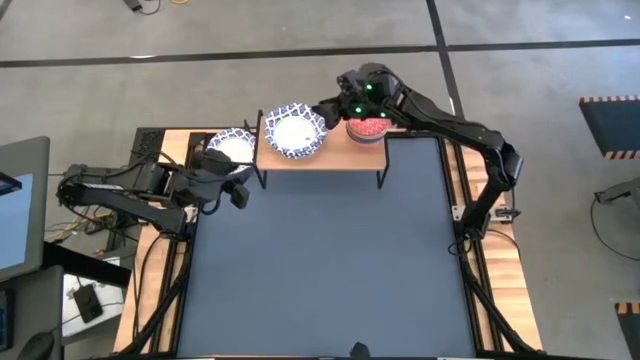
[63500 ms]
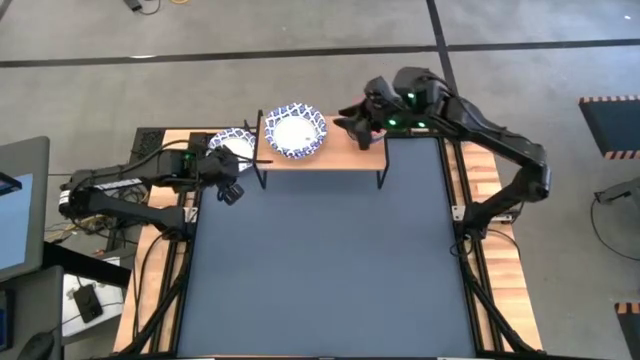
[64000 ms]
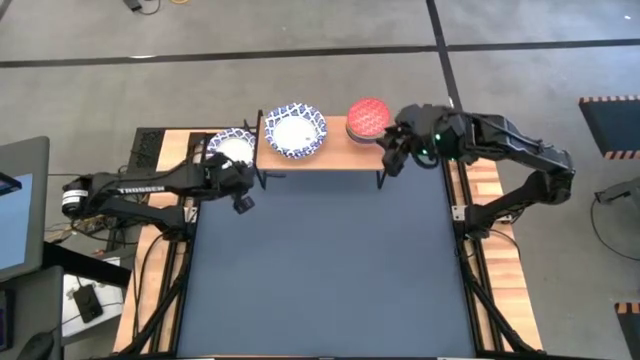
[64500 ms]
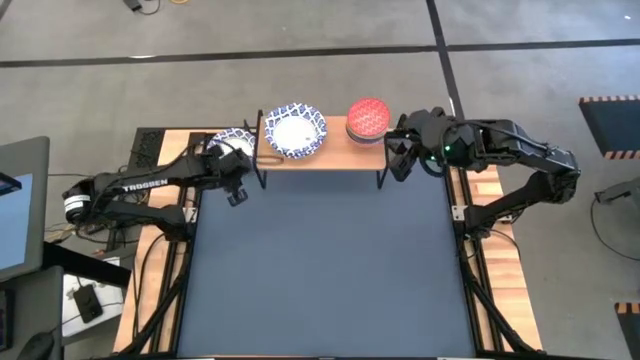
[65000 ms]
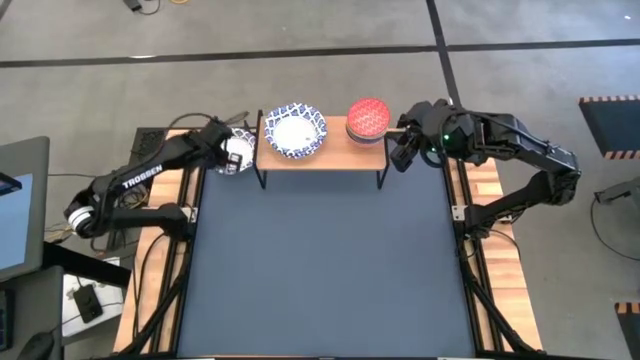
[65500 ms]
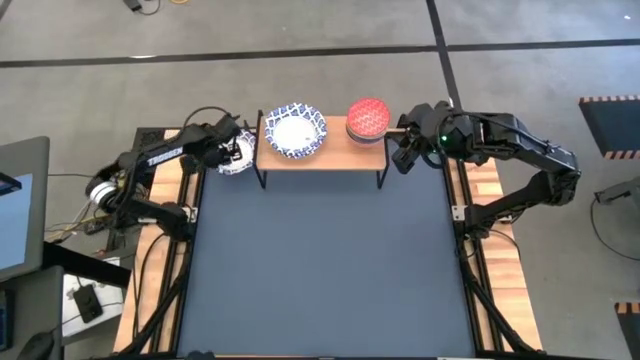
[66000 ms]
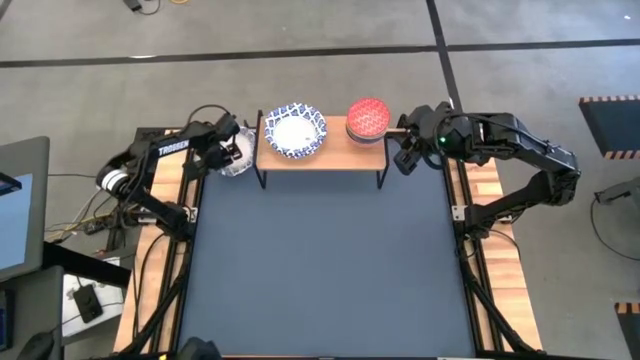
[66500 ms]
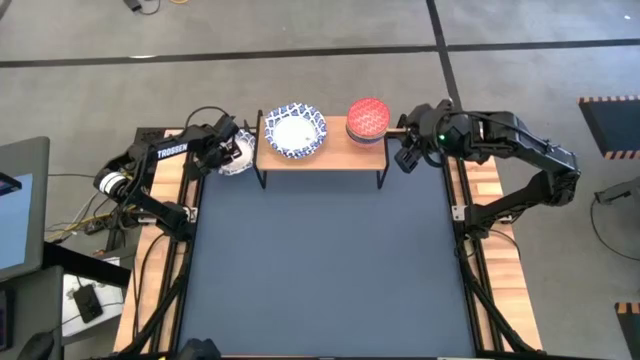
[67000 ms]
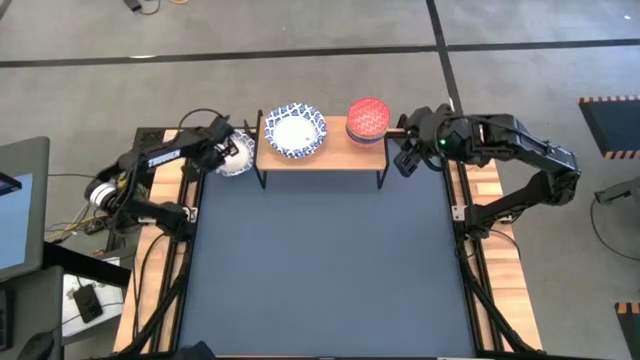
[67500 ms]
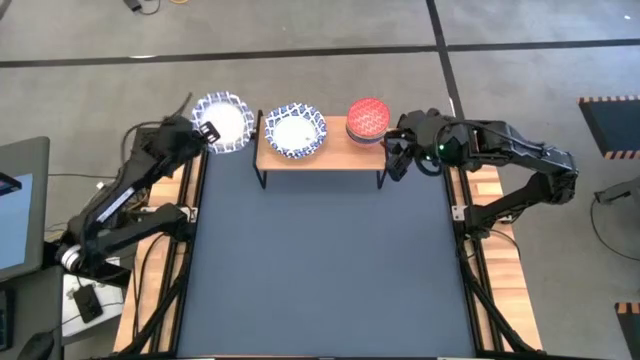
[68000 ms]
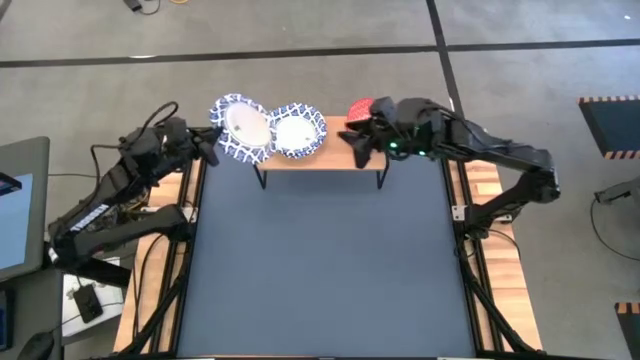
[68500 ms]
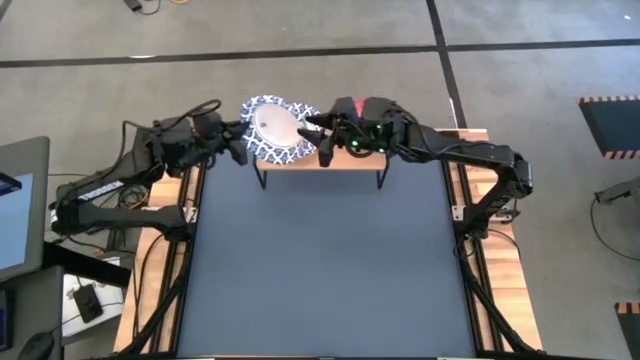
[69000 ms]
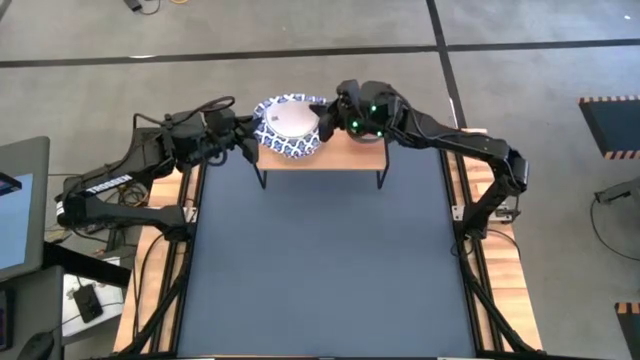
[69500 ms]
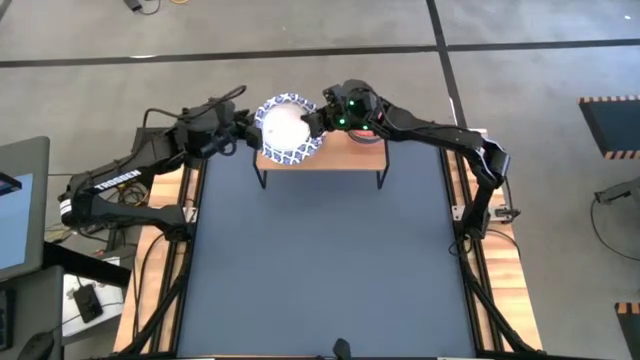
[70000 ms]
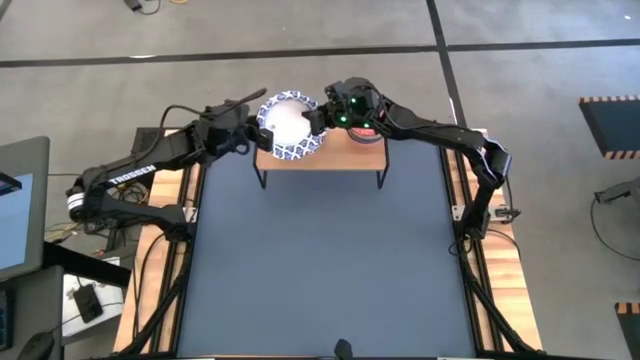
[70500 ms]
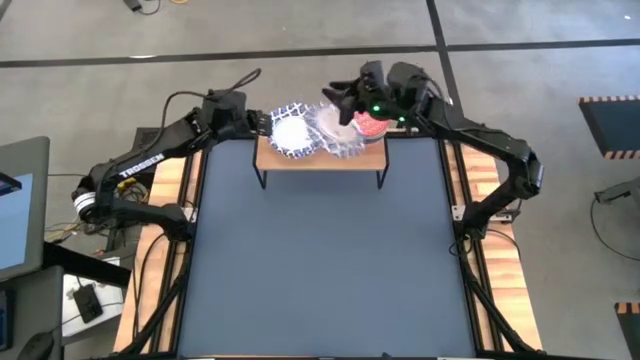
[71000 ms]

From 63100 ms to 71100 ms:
Task: Place and stack bowls onto a shelf
Stack the white bowl on top of the other white bowl on the shelf

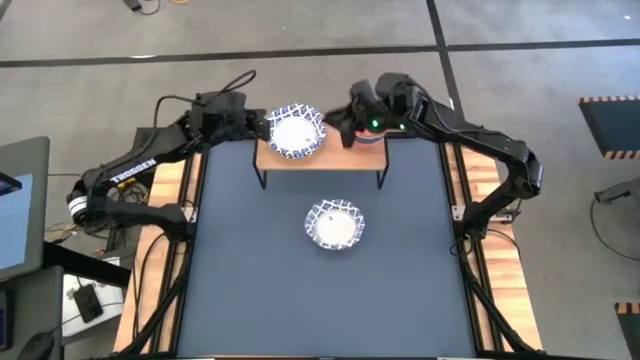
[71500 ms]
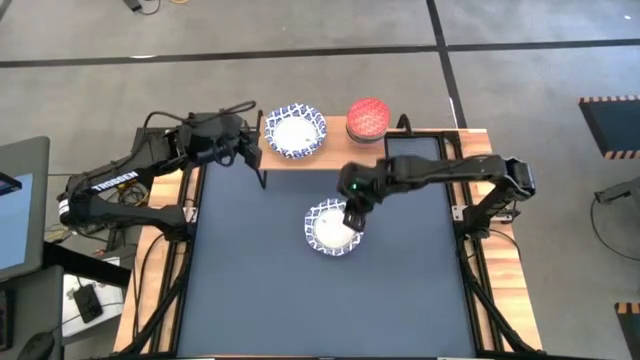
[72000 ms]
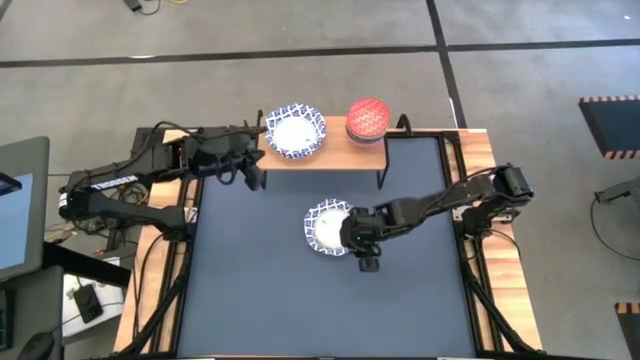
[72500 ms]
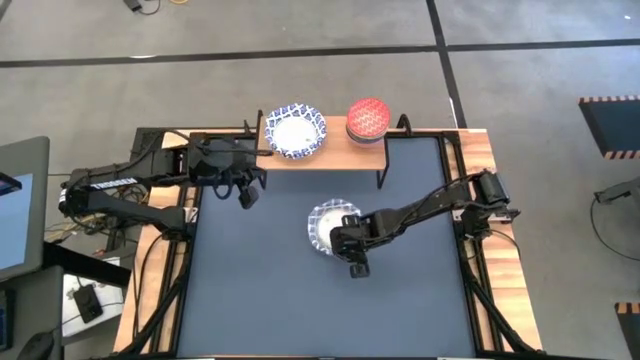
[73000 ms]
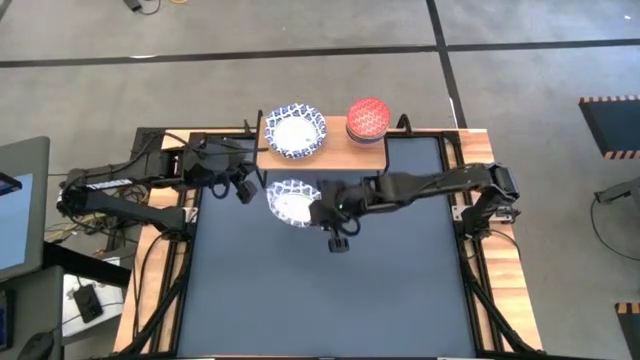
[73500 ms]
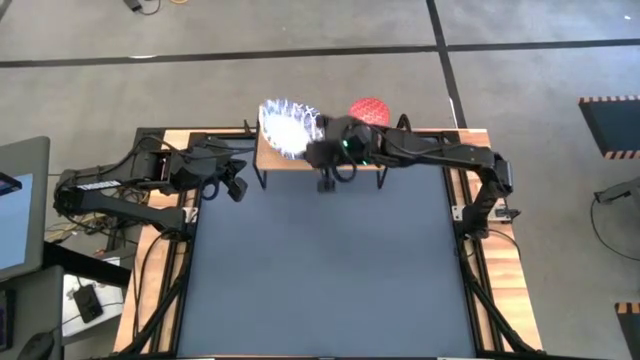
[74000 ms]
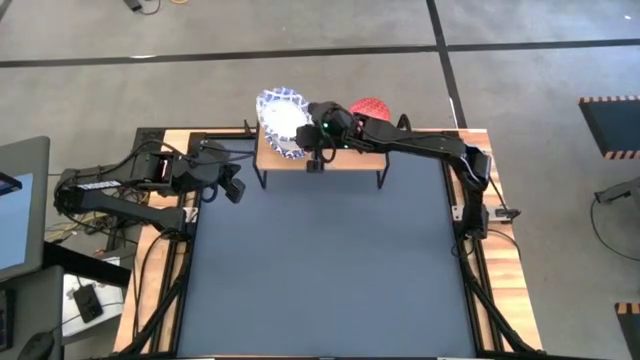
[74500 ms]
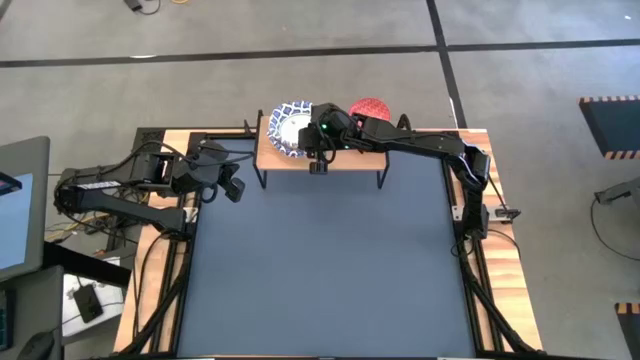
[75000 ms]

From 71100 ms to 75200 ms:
Stack the white bowl on top of the other white bowl on the shelf

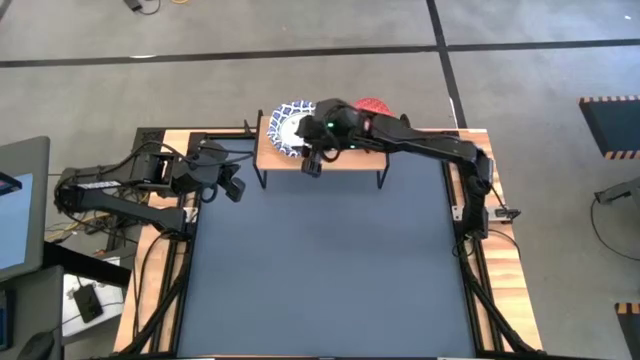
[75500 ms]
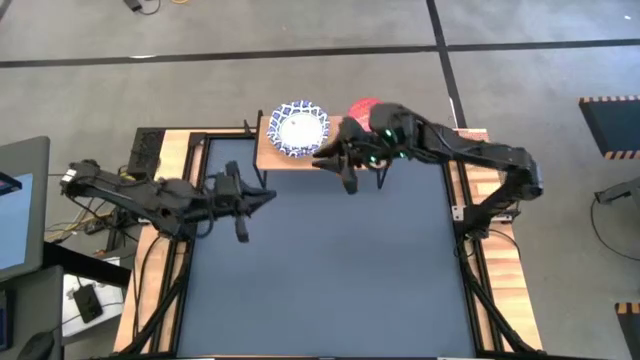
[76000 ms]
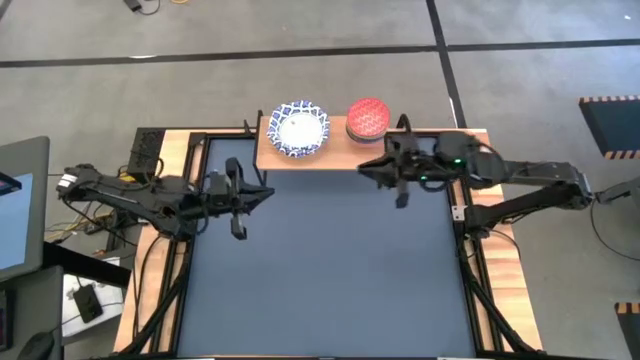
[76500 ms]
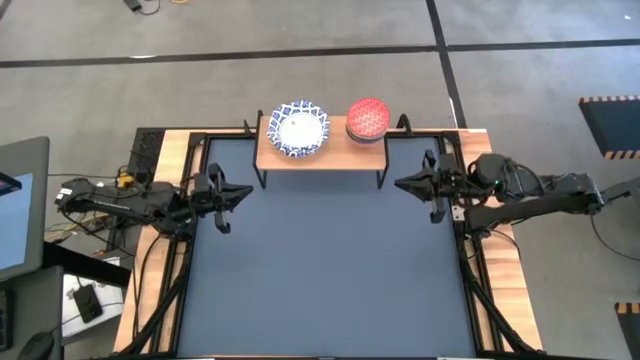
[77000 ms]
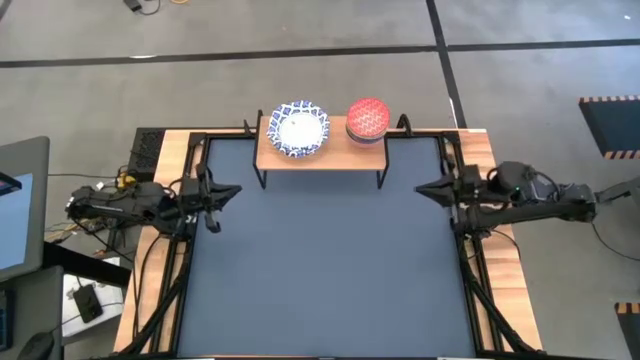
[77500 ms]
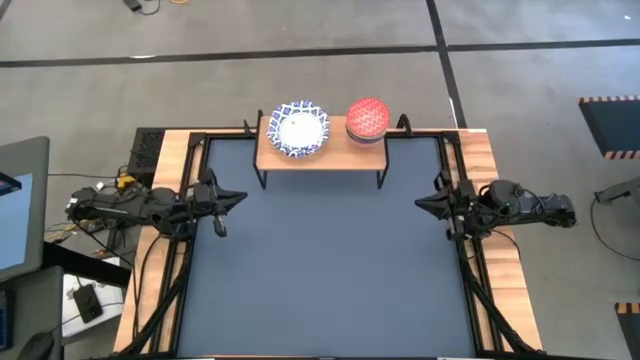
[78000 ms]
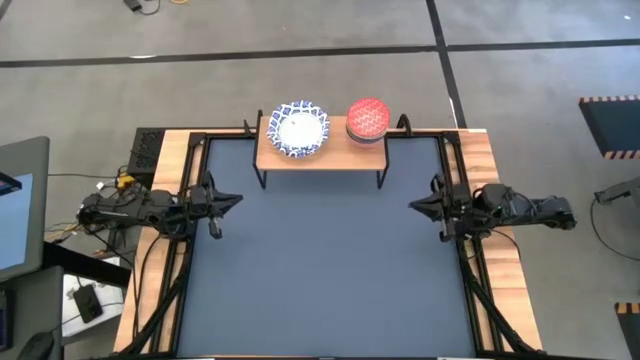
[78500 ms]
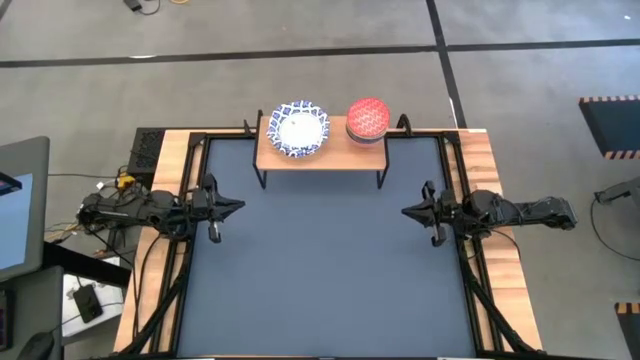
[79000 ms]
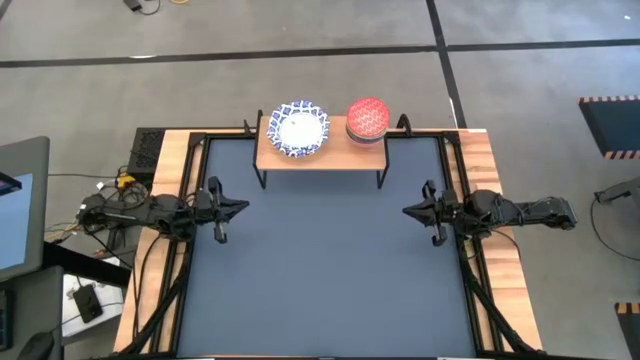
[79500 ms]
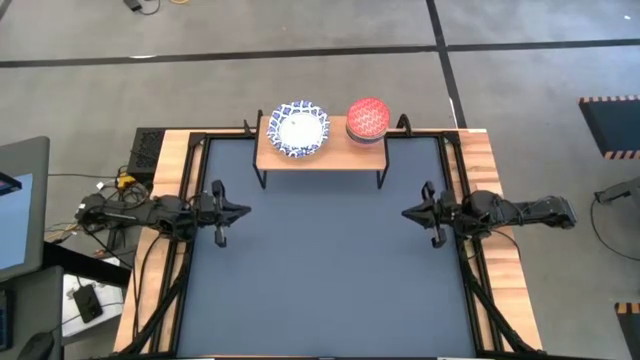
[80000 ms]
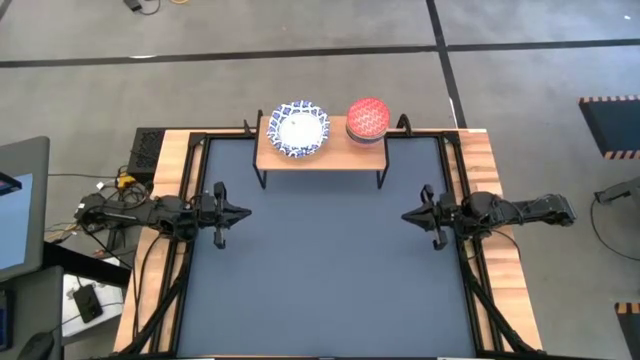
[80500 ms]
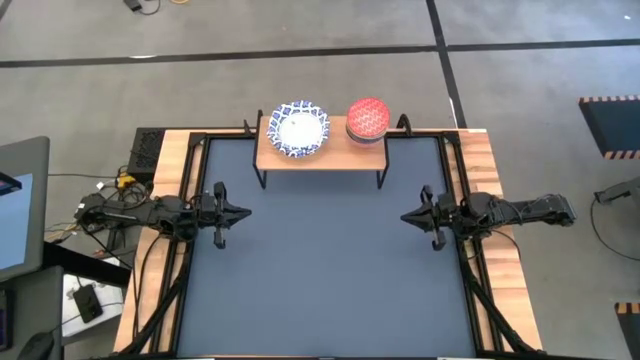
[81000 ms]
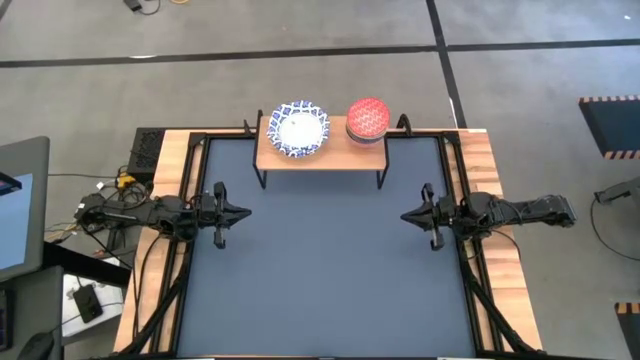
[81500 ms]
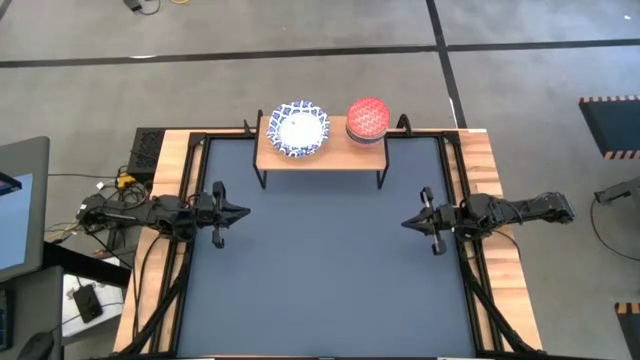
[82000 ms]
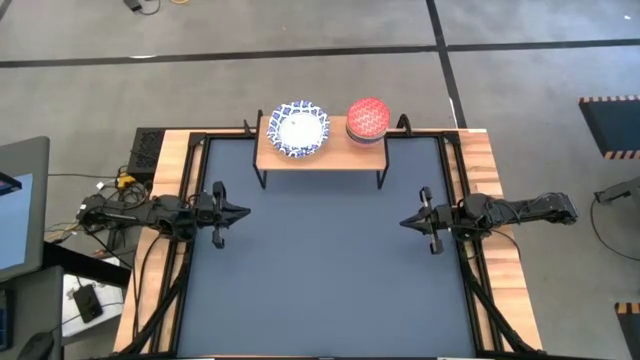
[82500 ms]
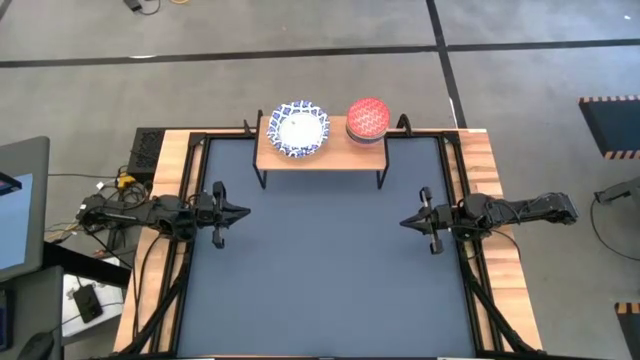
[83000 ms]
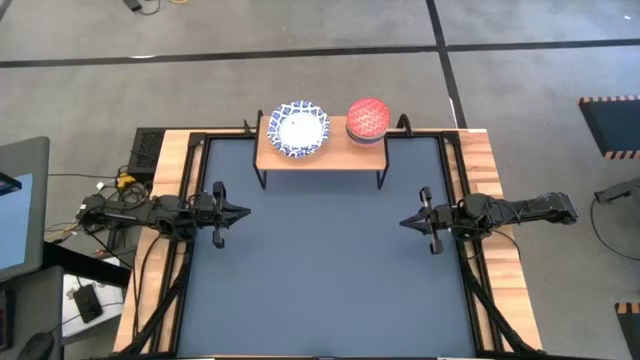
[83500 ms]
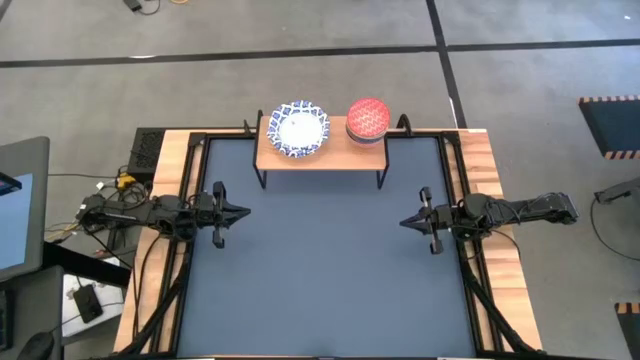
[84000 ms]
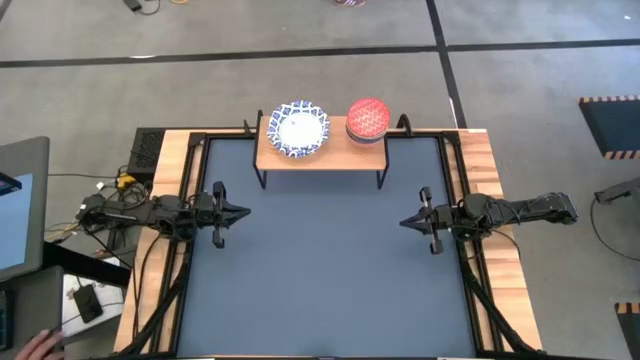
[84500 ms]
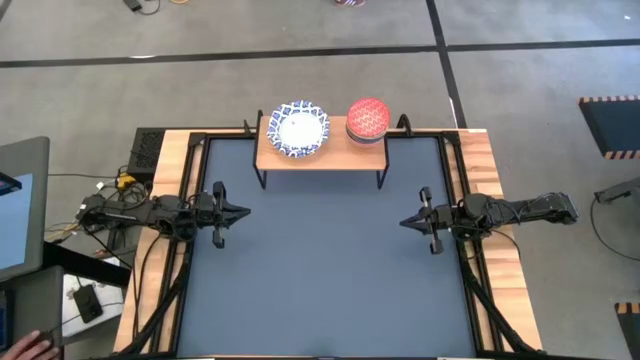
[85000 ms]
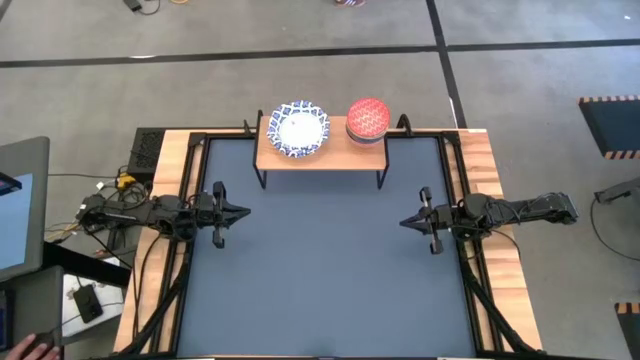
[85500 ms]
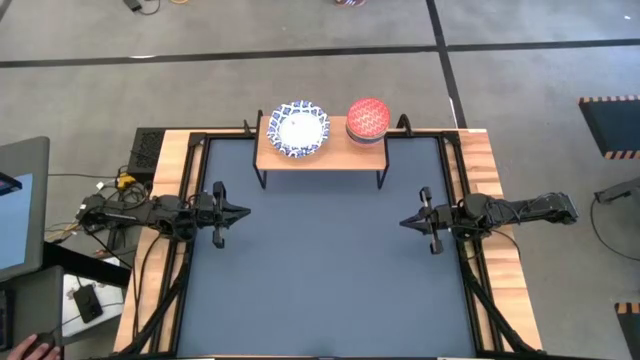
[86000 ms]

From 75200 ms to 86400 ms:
Return to Home Position
